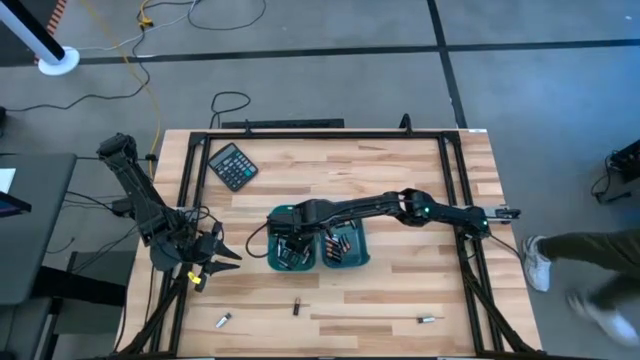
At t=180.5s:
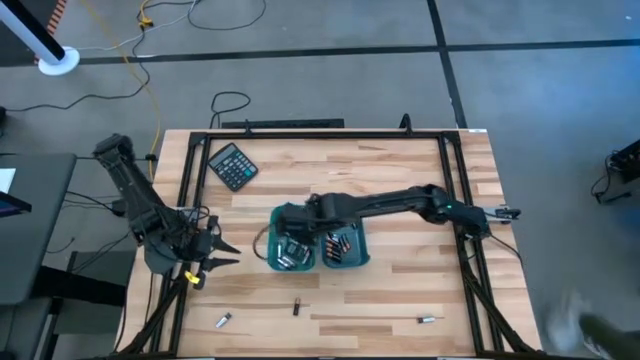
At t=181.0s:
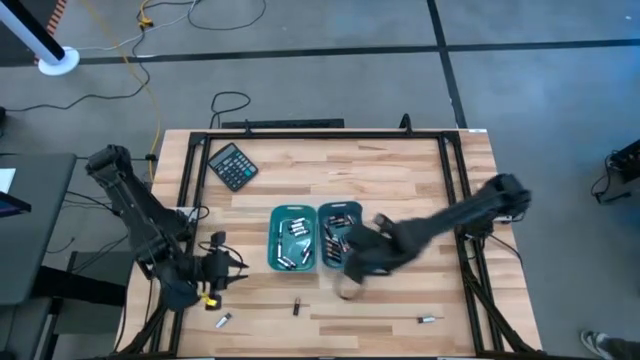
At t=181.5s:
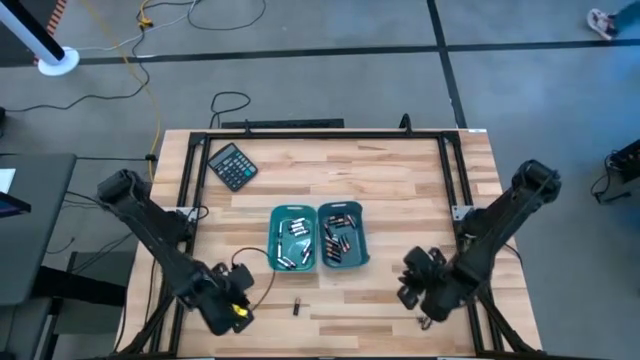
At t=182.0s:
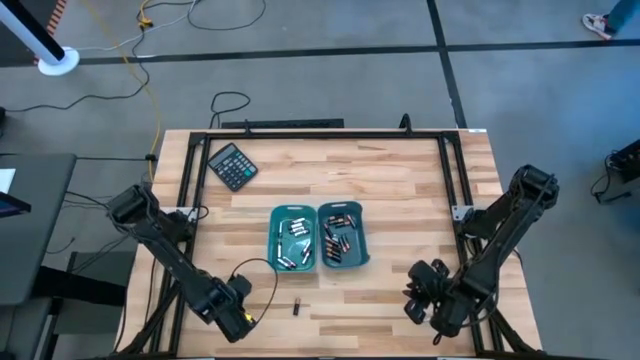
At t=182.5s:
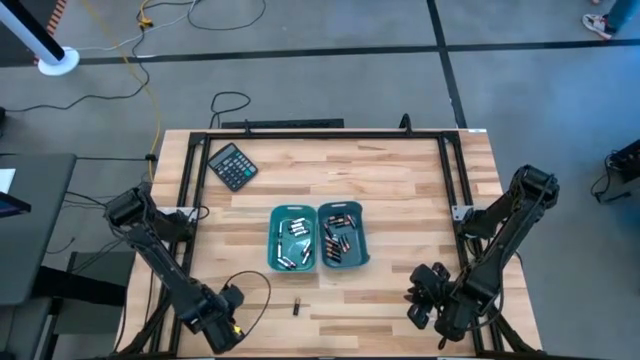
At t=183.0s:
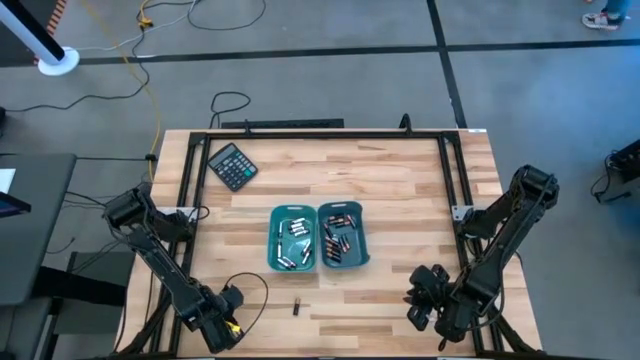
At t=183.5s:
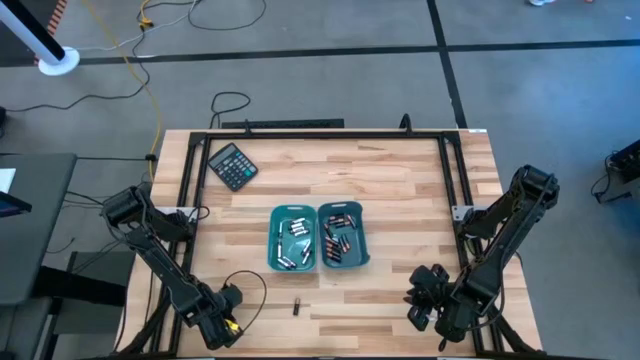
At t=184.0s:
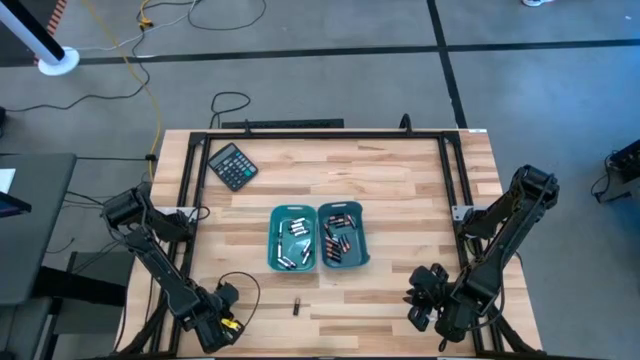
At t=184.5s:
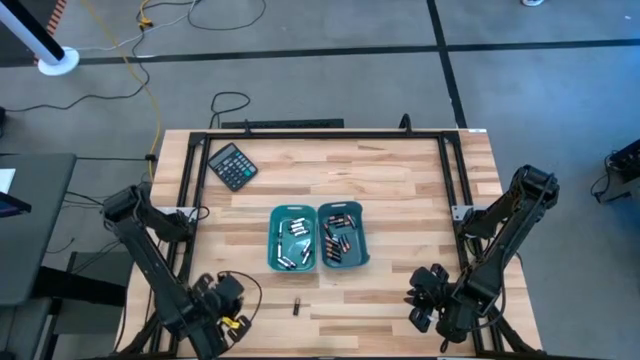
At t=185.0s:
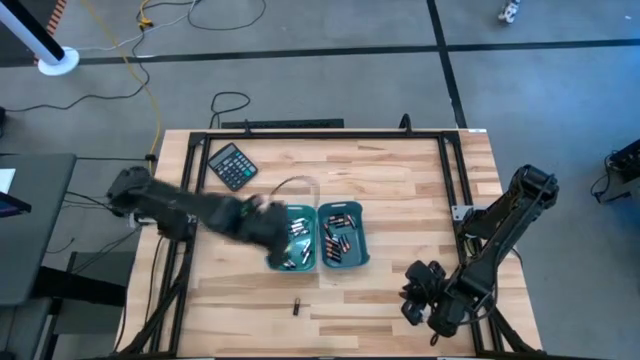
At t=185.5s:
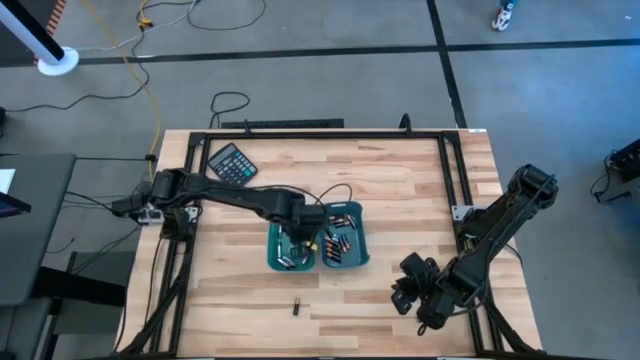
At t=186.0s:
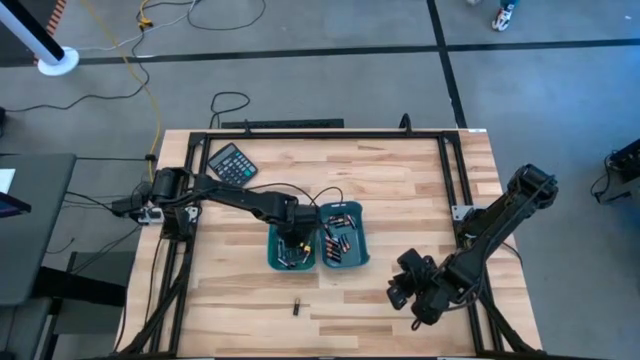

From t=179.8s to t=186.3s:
Task: Sort batteries
Put the silver battery into the green bin

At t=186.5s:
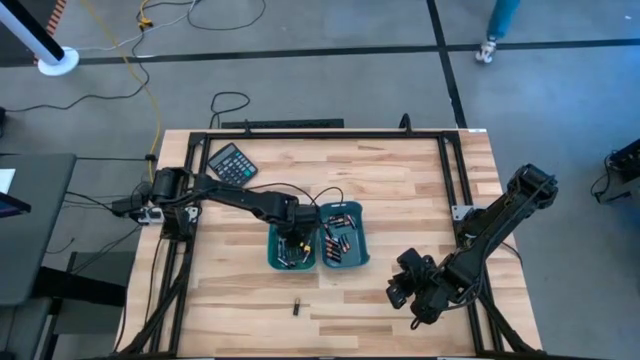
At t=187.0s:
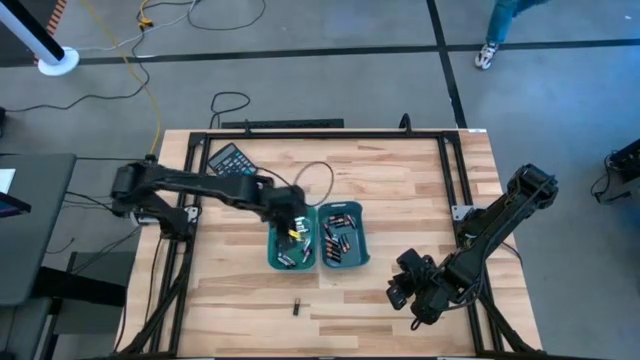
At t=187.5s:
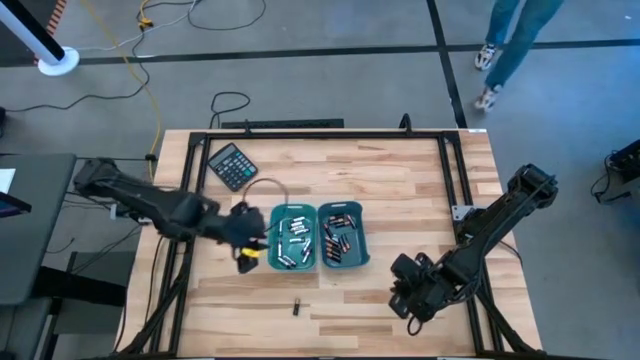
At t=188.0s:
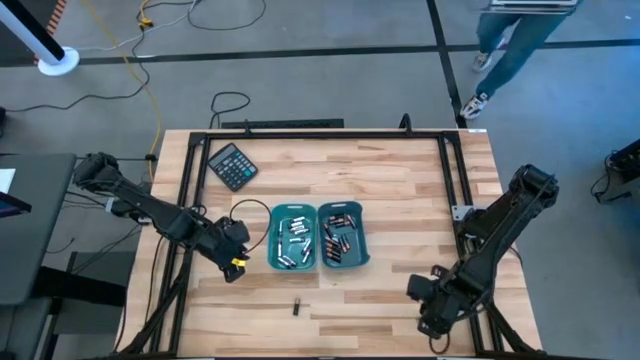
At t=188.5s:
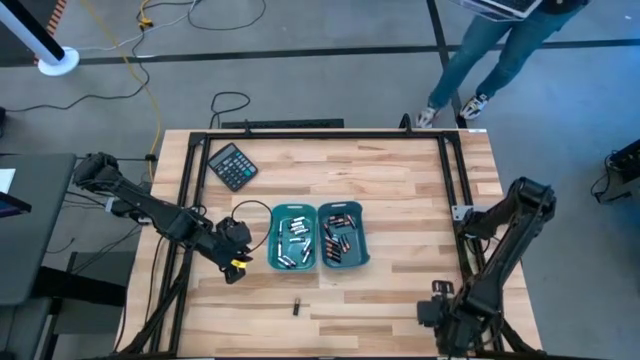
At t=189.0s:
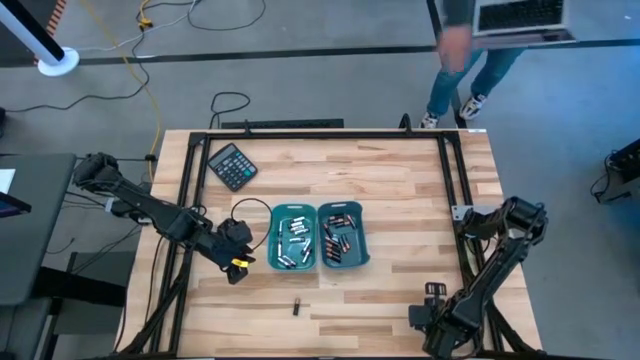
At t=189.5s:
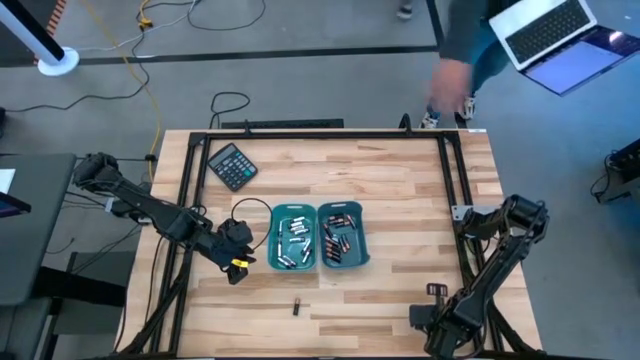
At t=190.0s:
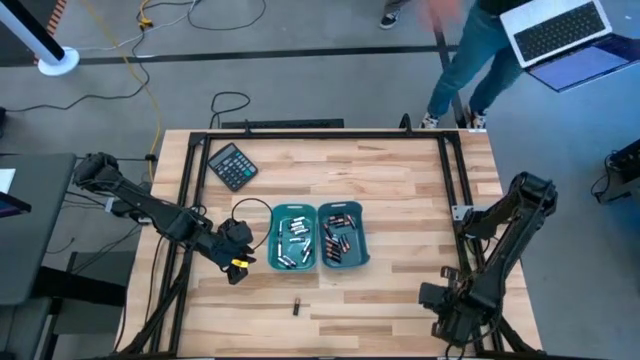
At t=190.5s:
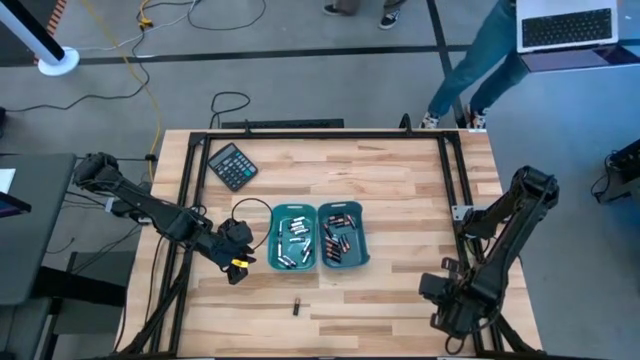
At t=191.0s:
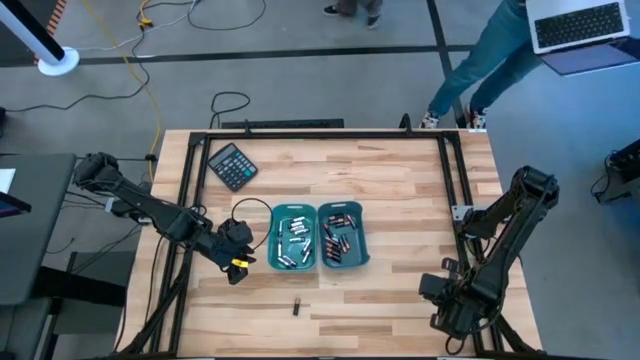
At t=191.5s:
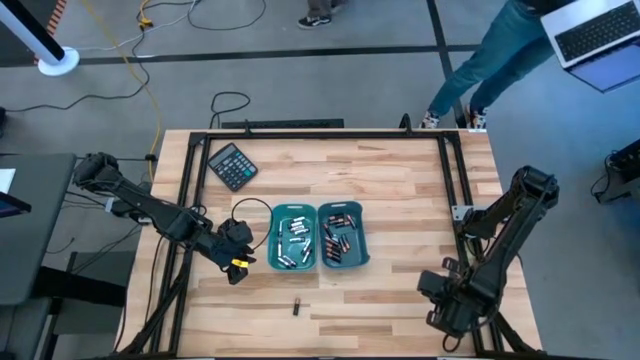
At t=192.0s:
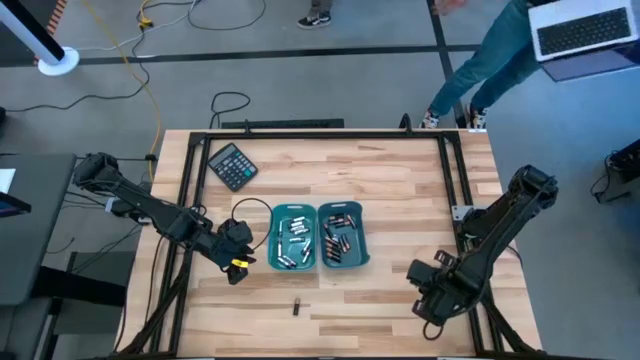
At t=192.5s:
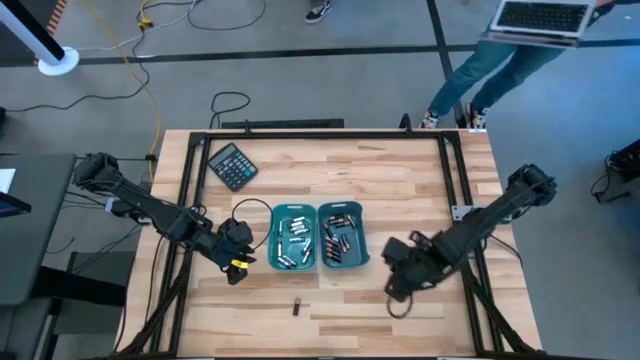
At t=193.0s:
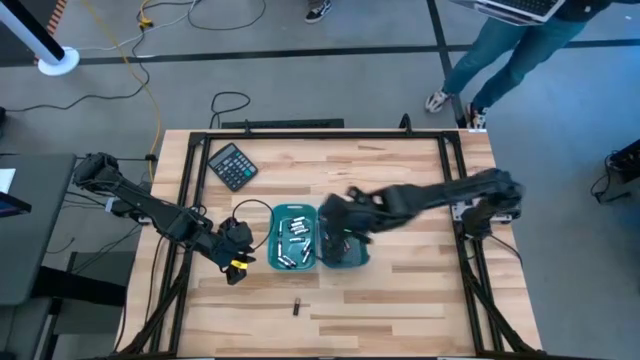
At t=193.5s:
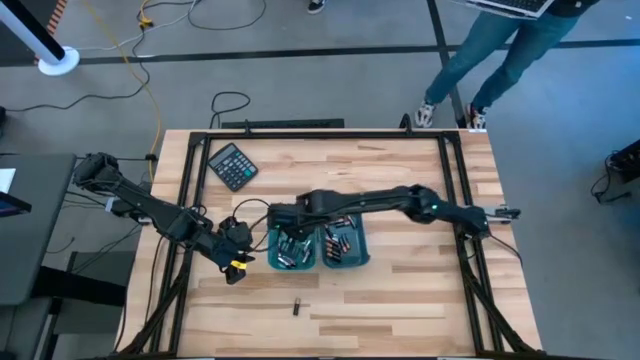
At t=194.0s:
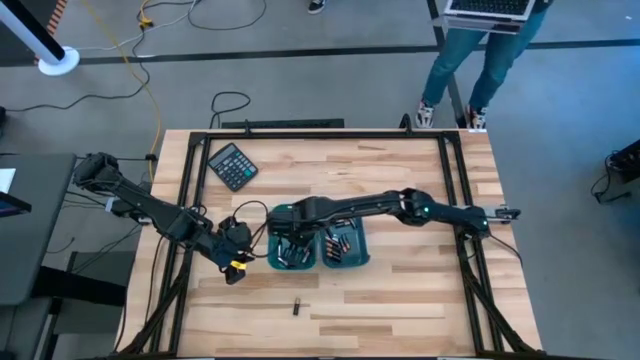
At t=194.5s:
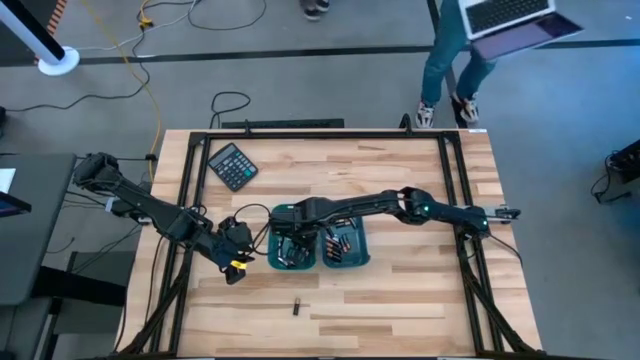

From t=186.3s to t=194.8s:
Put the silver battery into the green bin

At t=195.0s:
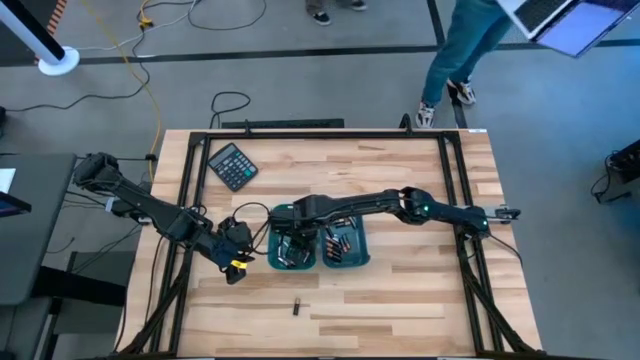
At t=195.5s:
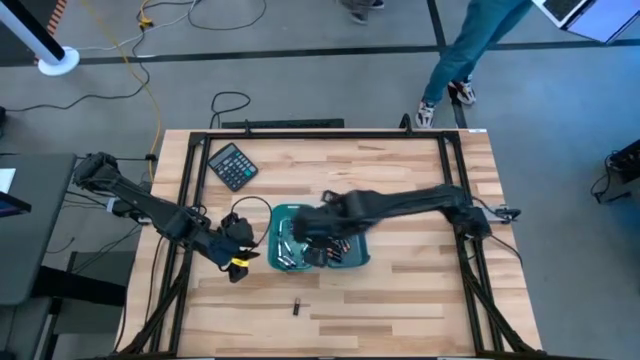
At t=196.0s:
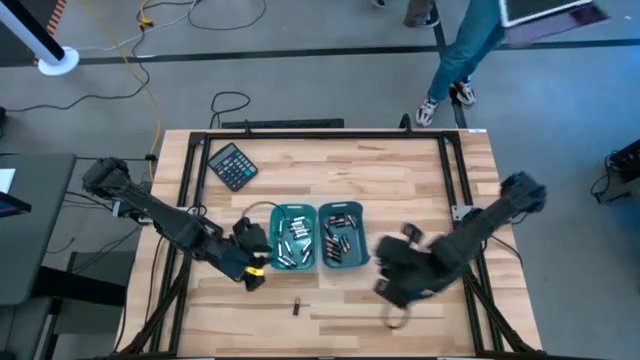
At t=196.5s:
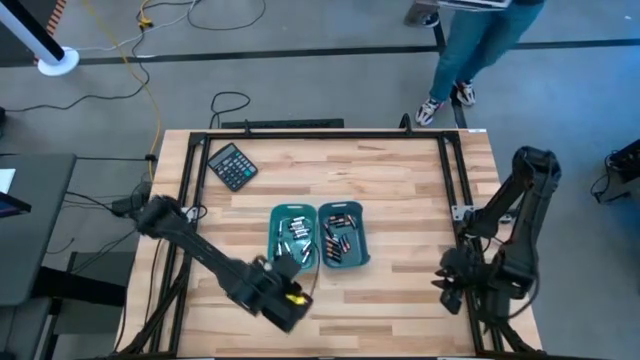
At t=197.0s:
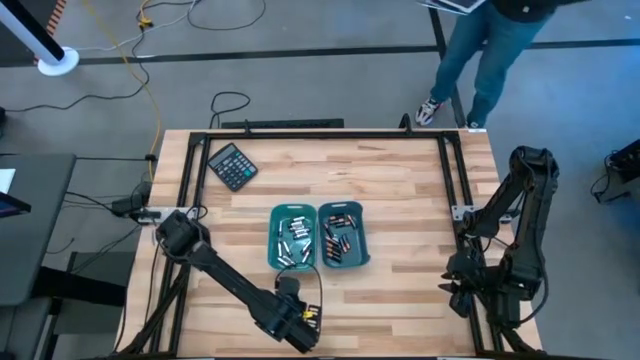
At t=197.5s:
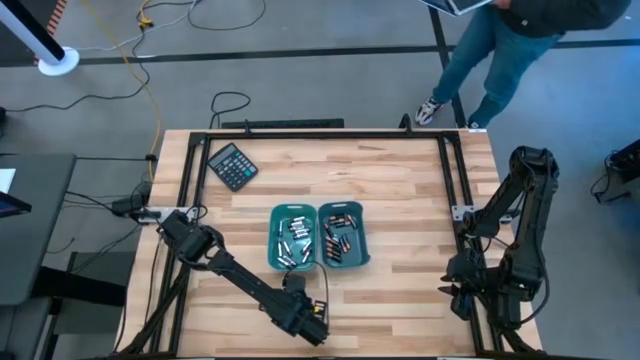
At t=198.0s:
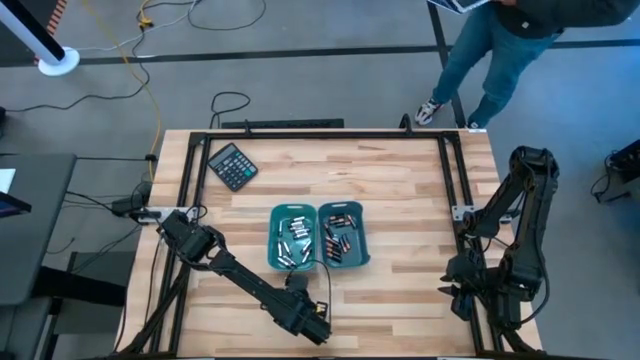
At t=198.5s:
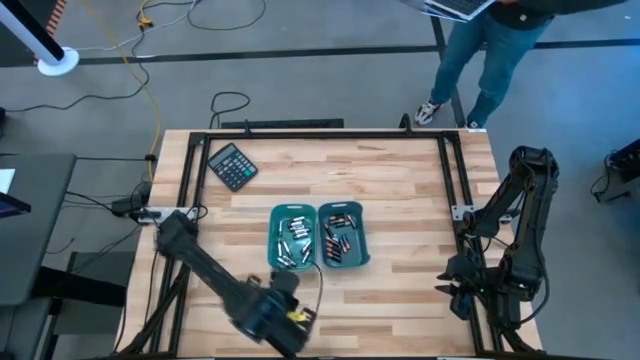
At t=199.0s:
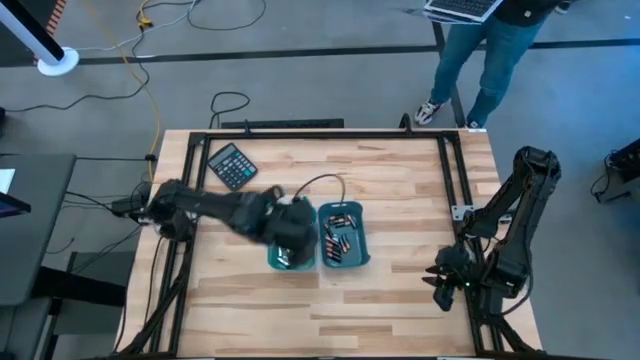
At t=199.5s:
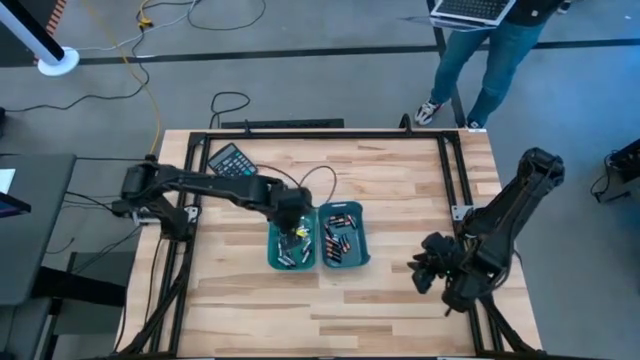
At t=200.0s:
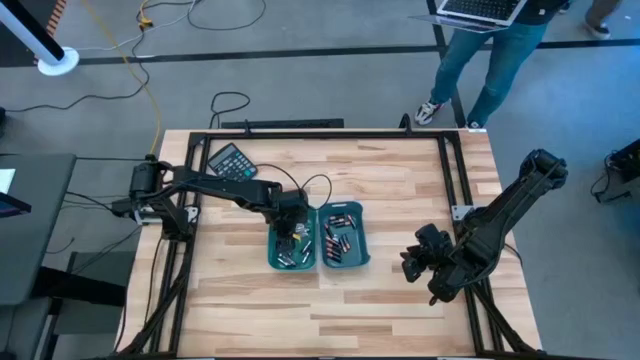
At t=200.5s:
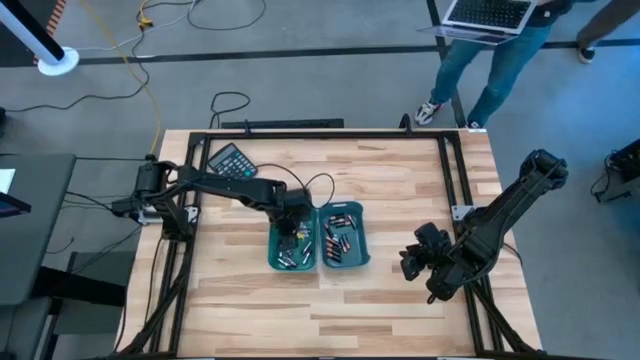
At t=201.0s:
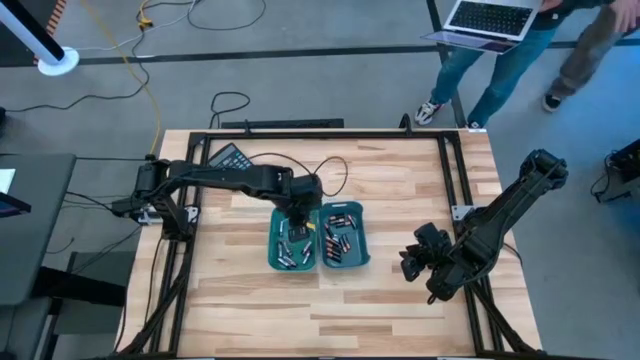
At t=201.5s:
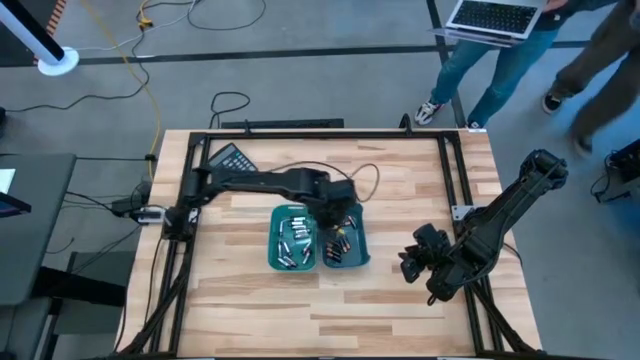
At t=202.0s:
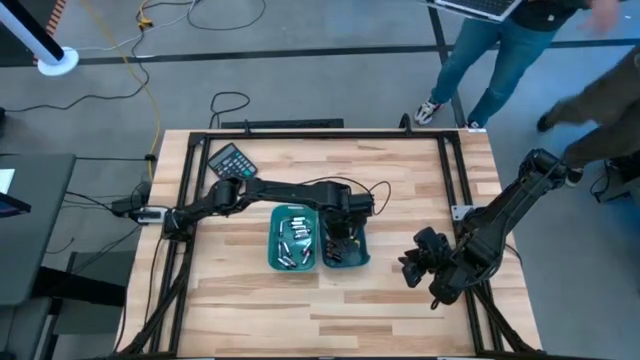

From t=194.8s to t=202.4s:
Put the black battery into the blue bin
